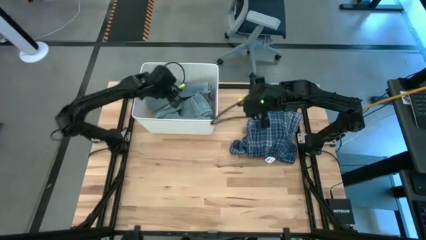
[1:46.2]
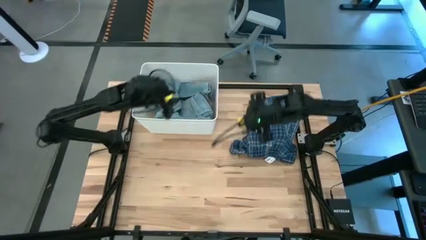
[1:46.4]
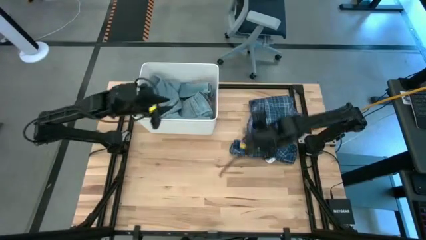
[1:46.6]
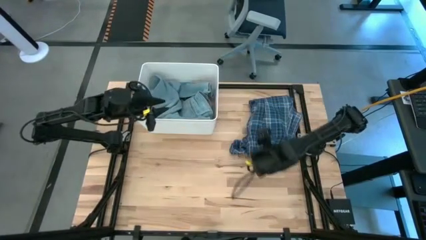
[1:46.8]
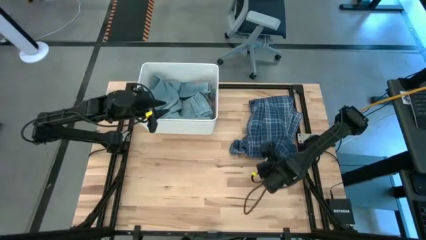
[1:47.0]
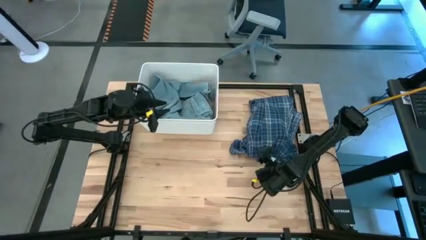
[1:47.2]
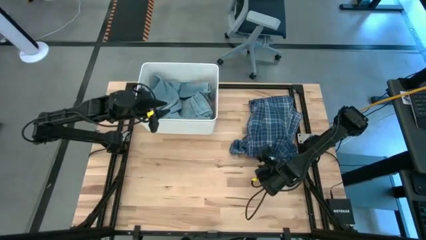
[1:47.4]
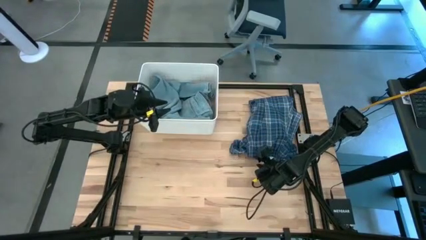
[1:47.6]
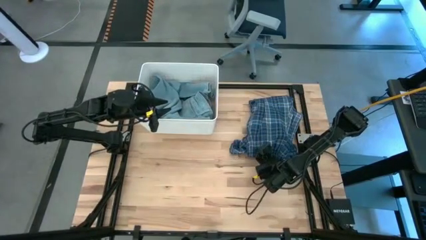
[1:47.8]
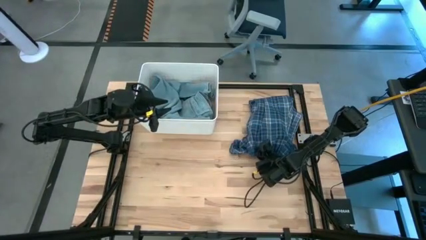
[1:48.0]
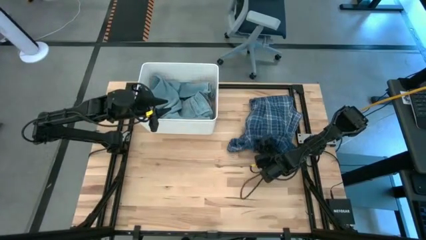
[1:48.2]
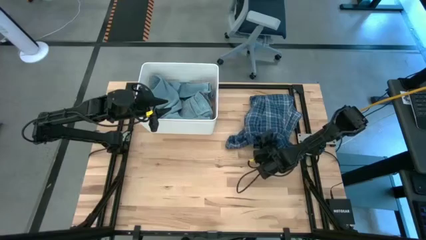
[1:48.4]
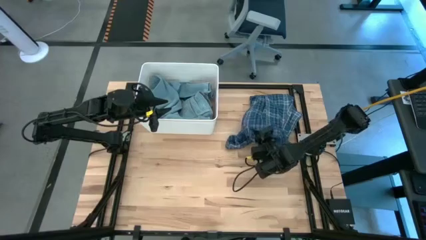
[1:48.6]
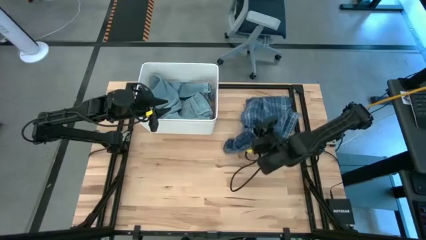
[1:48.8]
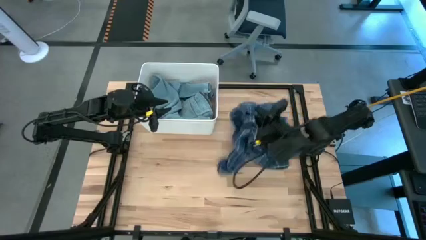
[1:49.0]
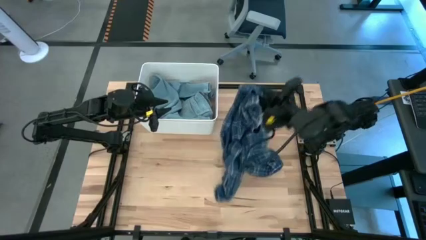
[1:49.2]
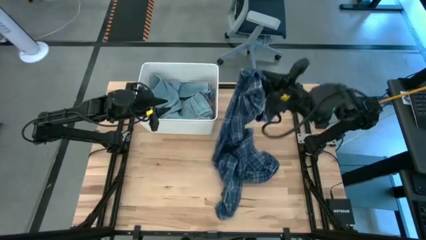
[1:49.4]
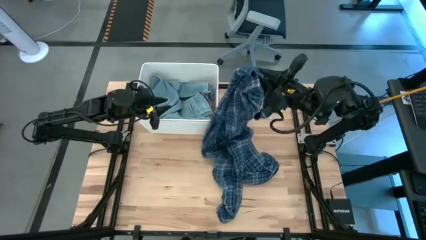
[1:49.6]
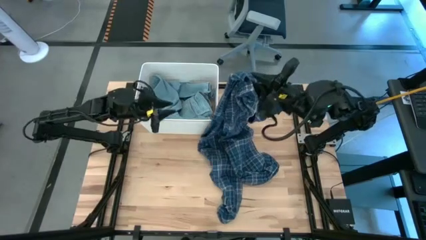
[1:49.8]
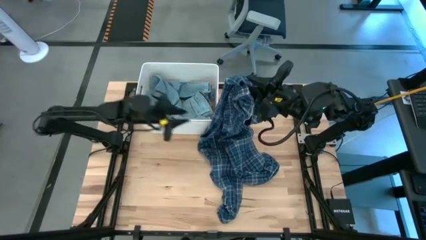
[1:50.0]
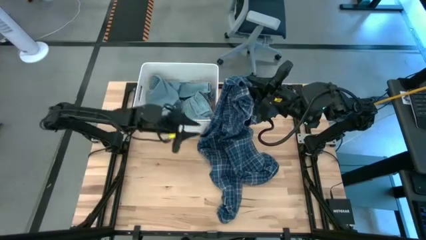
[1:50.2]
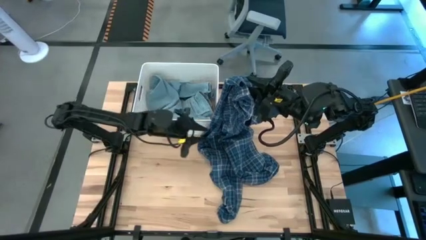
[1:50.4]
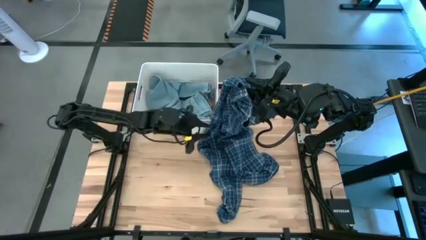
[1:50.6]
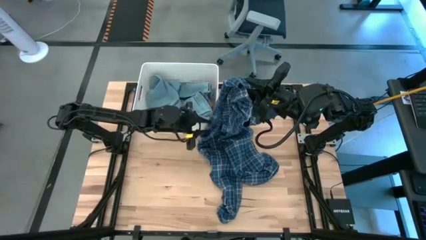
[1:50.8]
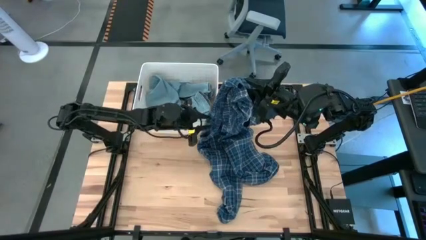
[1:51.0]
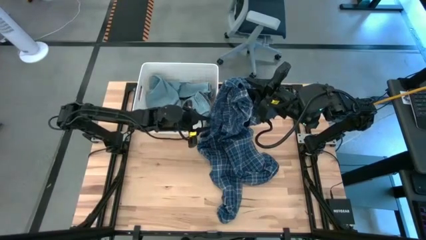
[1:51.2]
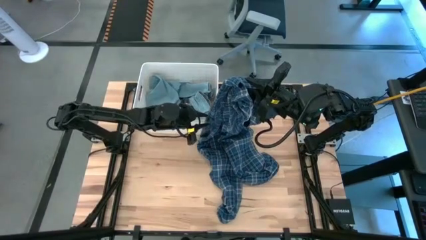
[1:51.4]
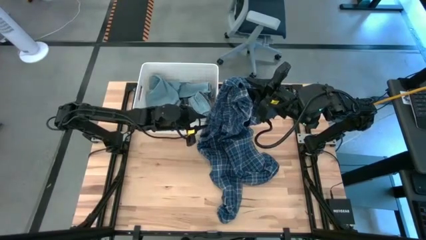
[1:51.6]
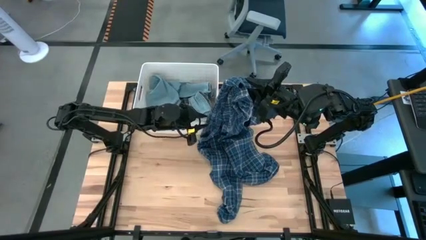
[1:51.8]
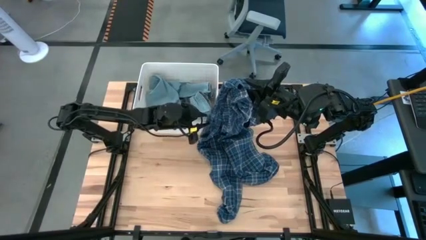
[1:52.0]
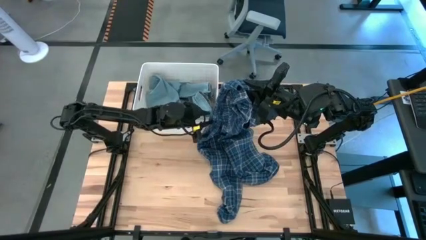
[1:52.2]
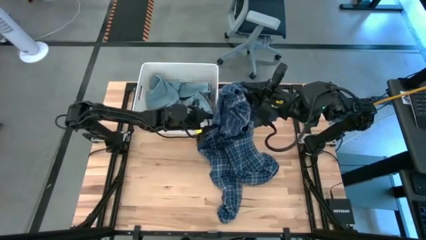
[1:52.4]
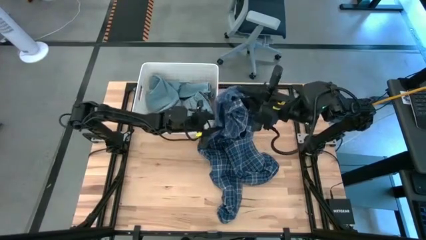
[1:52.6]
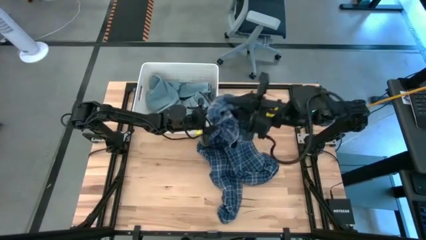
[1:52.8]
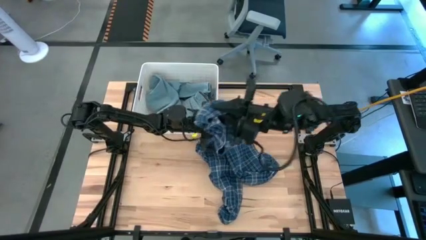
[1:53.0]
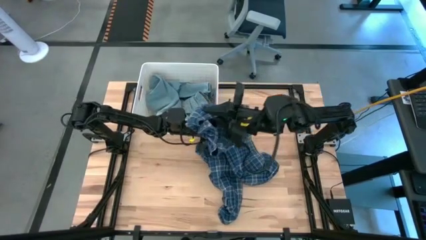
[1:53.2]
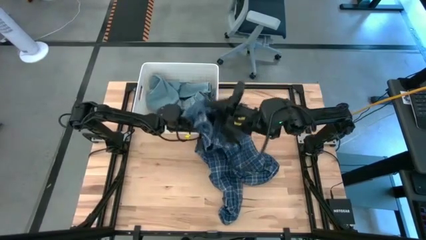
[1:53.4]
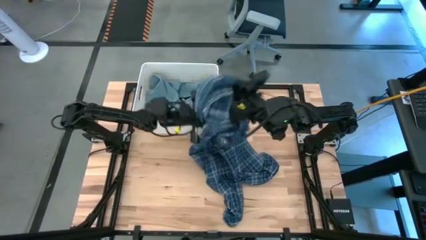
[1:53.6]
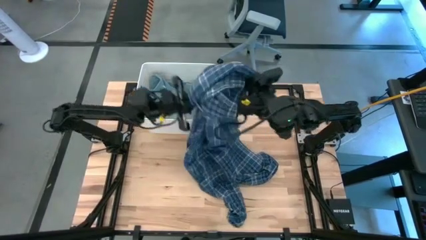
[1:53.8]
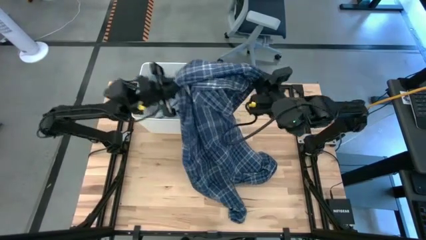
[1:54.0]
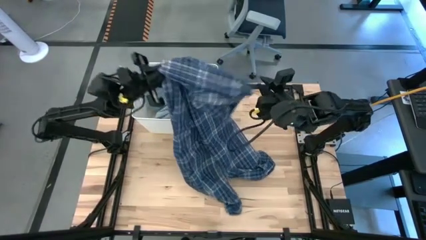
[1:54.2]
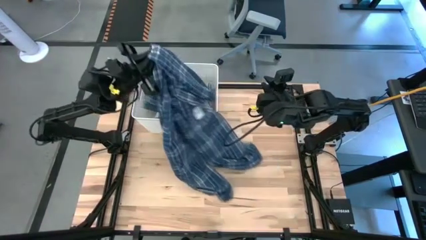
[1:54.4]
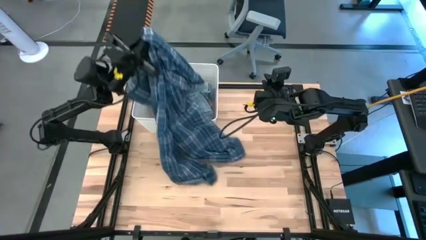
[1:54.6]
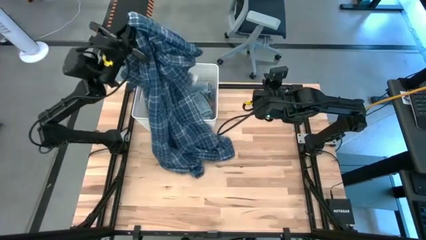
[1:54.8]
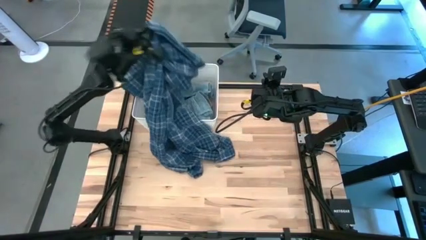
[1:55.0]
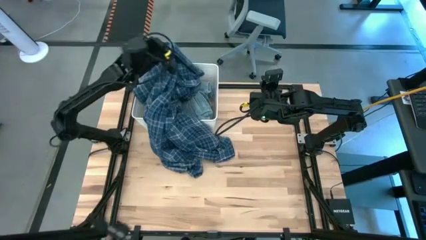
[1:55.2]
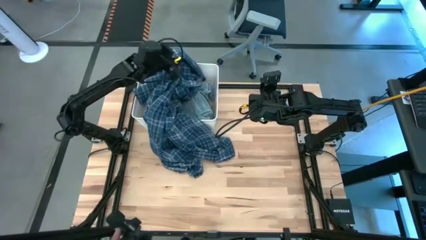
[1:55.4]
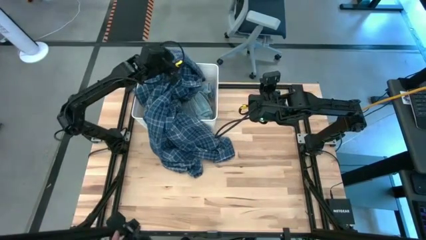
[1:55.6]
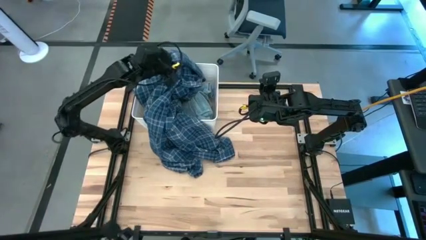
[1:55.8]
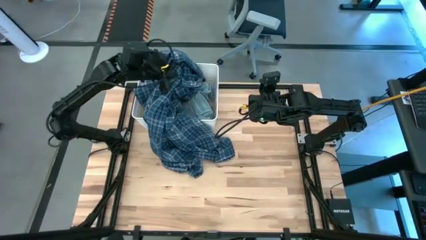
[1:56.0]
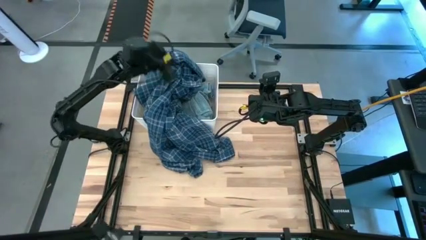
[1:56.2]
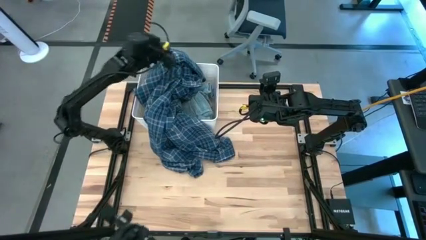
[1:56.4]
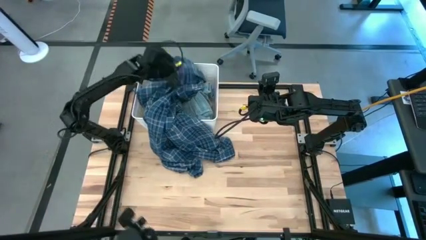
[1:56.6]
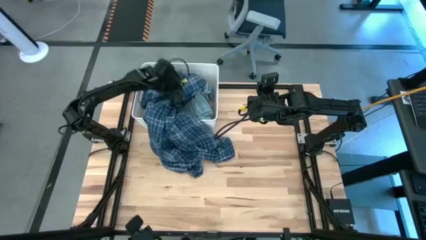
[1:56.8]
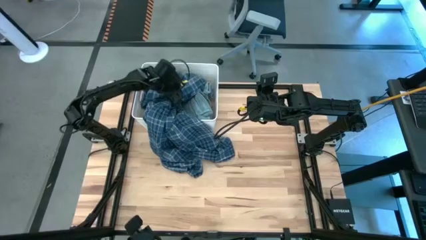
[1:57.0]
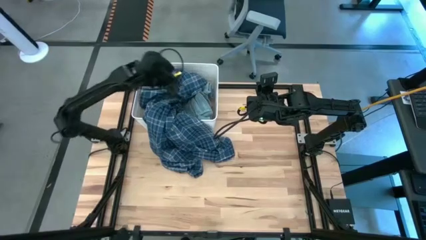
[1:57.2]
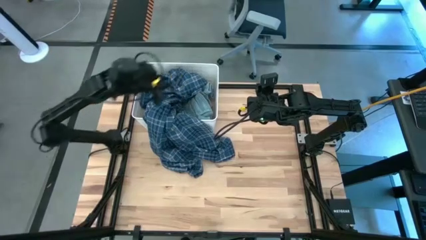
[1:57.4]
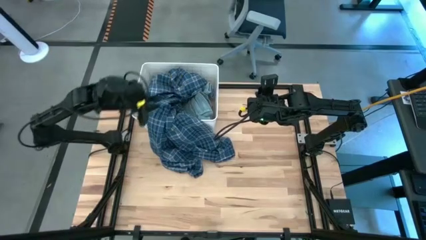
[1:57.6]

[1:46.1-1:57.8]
Task: Sort clothes
Put the blue plaid shirt into the white bin

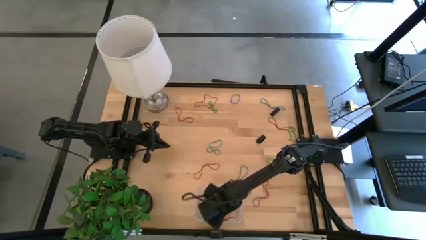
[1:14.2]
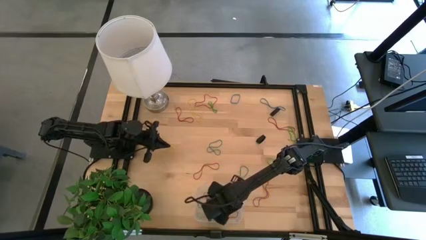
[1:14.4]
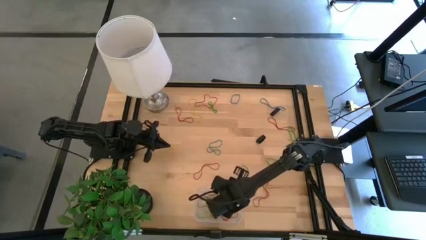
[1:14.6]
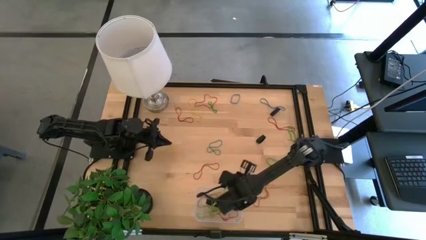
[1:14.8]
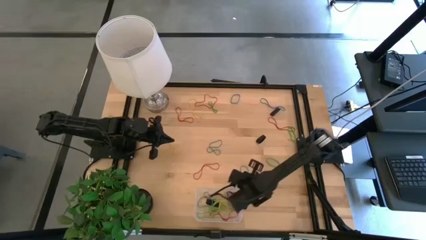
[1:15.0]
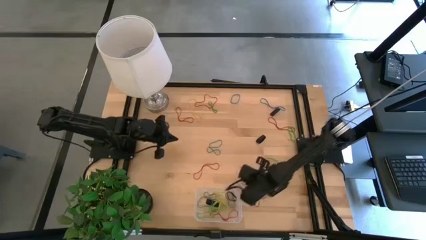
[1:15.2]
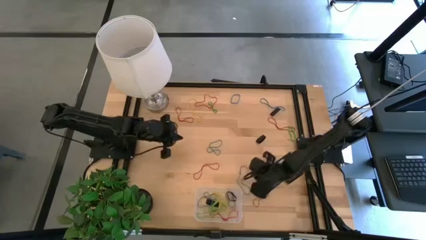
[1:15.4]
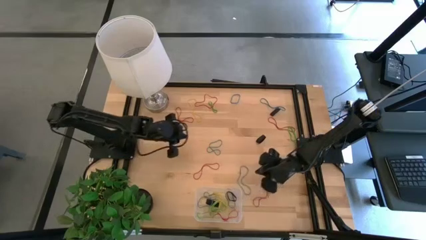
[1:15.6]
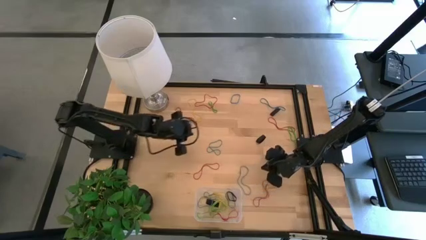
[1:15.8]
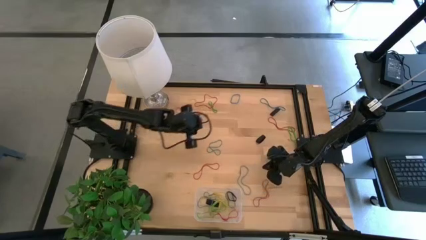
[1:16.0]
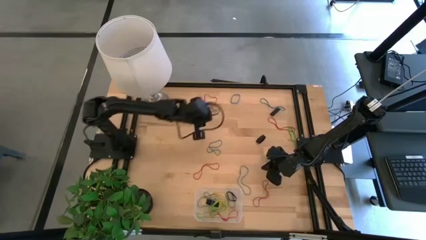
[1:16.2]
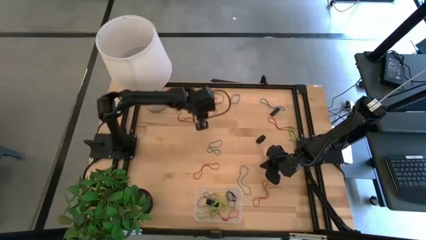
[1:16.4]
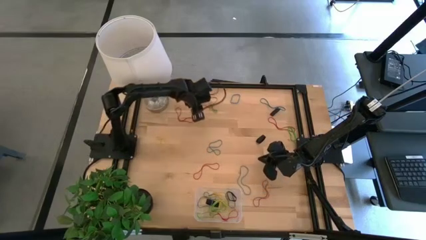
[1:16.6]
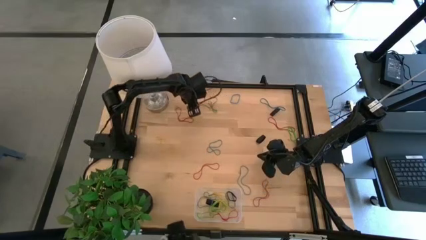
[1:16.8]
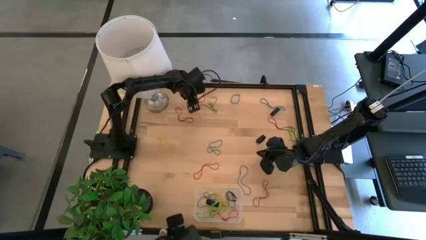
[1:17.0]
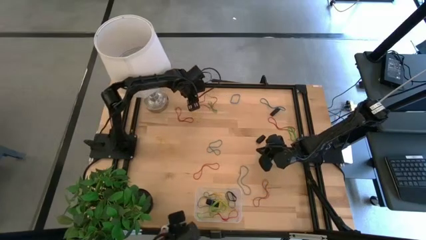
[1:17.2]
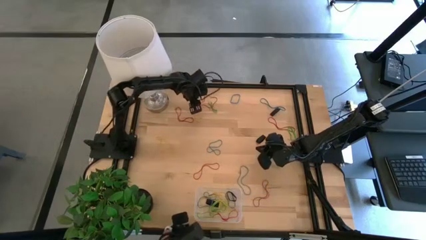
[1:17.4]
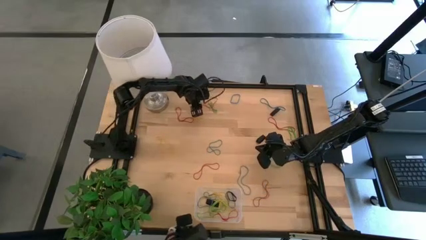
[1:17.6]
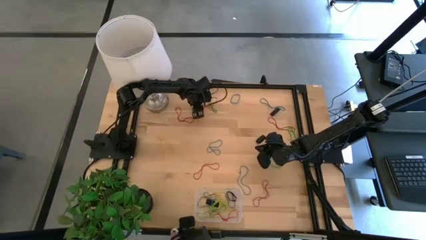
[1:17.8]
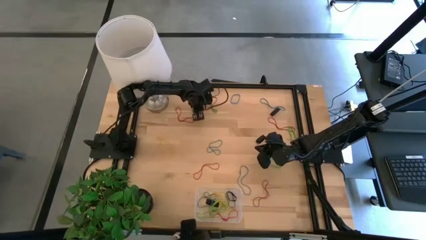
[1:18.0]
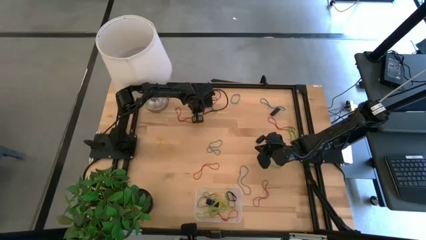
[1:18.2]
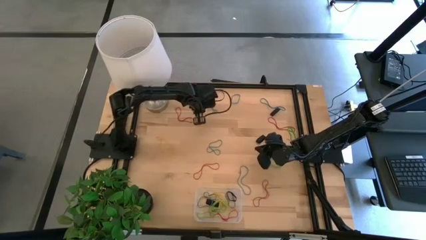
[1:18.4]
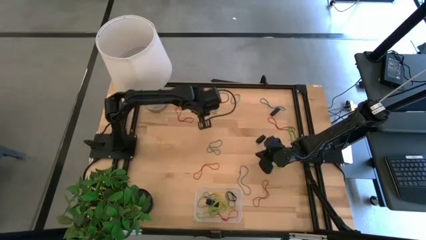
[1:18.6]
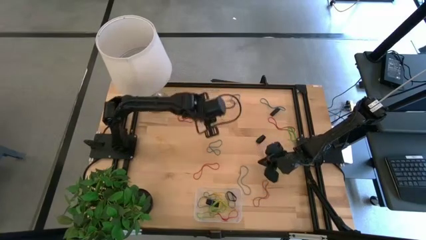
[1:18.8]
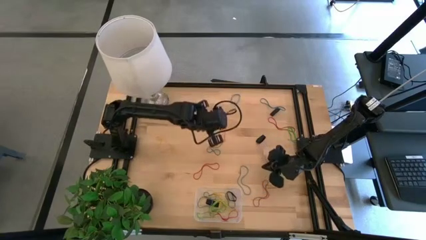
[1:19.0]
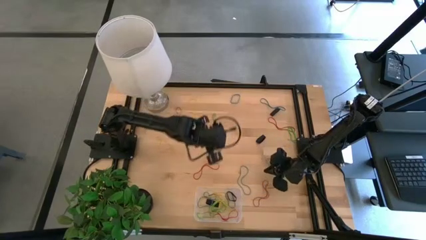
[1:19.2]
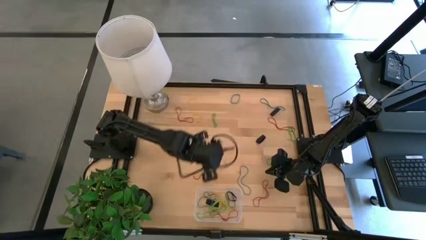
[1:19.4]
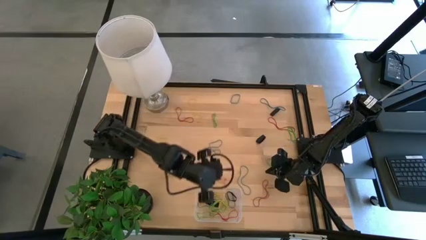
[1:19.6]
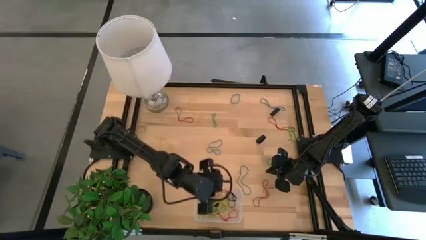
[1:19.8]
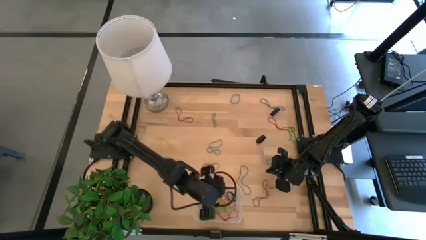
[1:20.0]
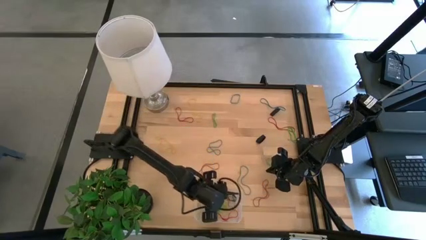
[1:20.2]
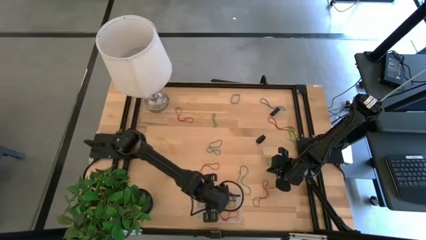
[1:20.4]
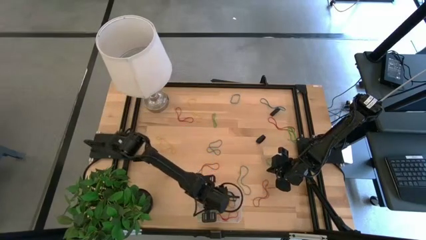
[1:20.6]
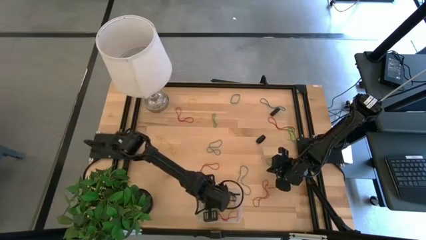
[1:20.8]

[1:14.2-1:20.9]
Task: Pick and place rubber bands into bin
Put the red rubber band into the transparent bin
